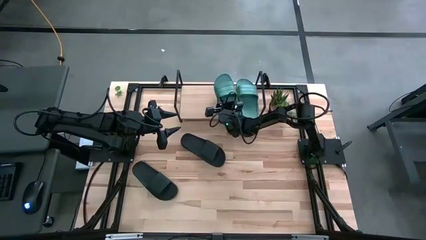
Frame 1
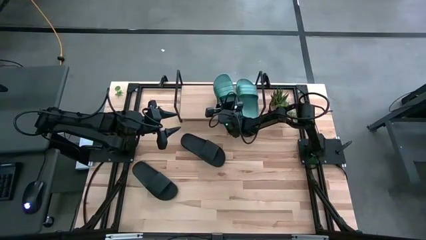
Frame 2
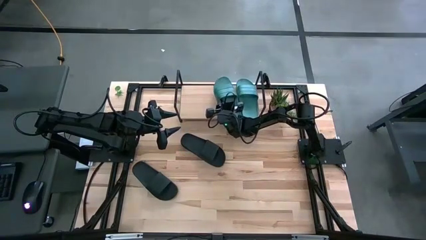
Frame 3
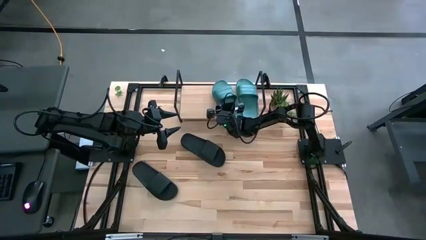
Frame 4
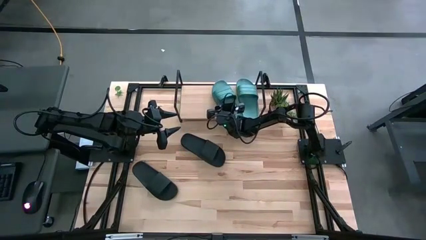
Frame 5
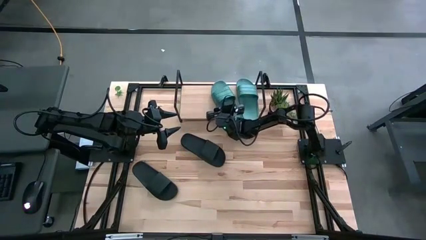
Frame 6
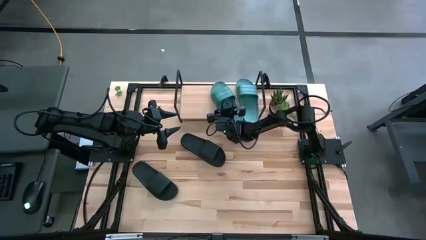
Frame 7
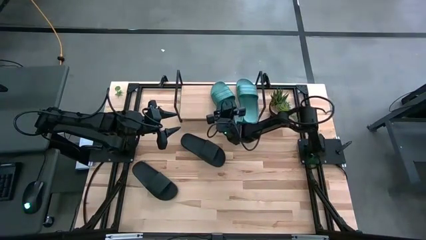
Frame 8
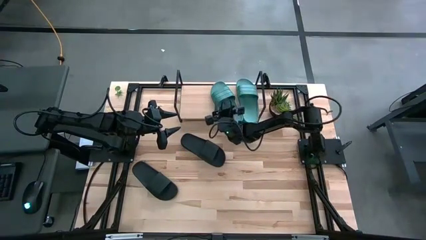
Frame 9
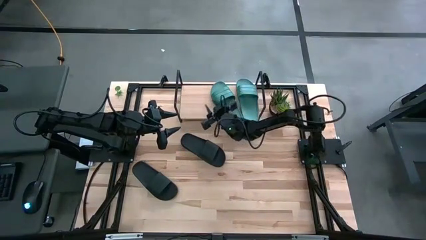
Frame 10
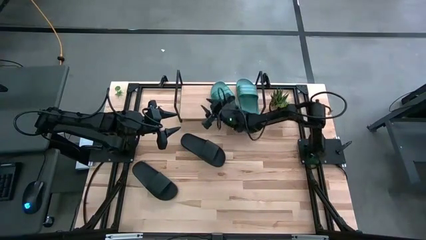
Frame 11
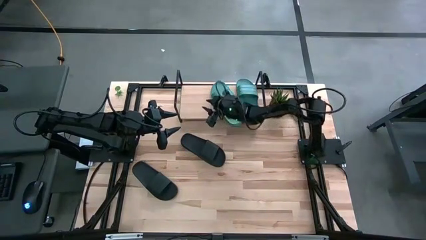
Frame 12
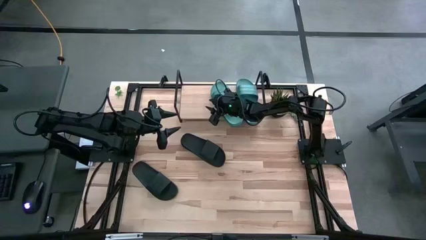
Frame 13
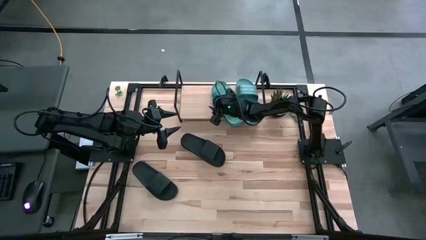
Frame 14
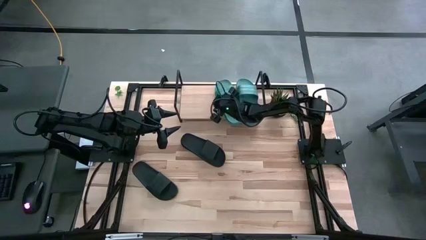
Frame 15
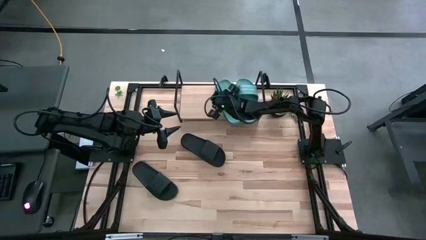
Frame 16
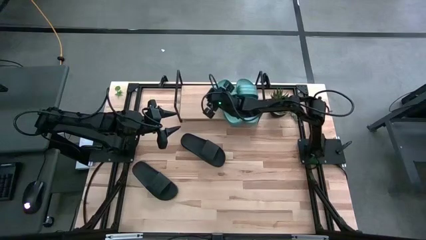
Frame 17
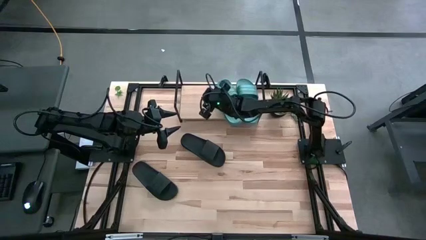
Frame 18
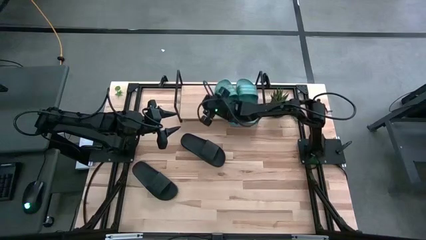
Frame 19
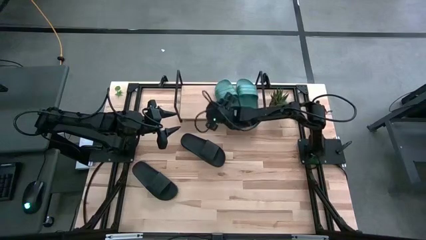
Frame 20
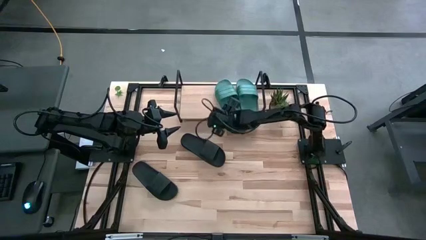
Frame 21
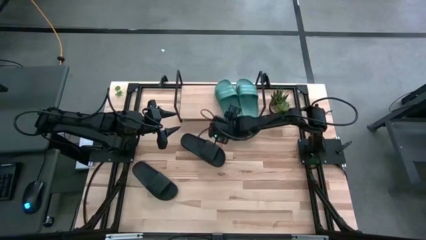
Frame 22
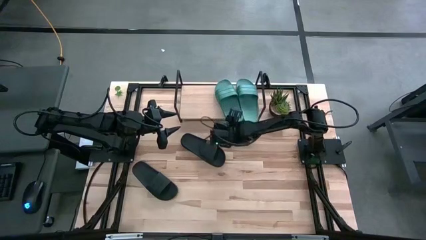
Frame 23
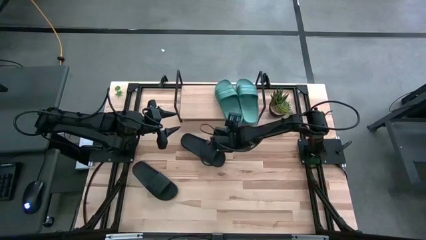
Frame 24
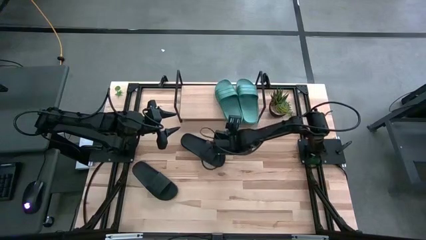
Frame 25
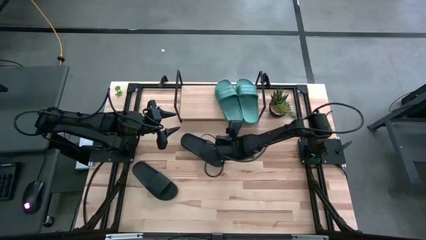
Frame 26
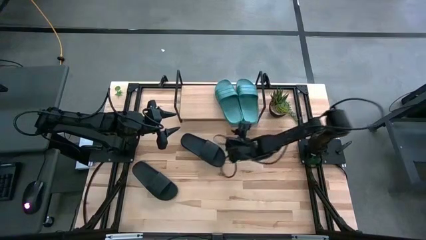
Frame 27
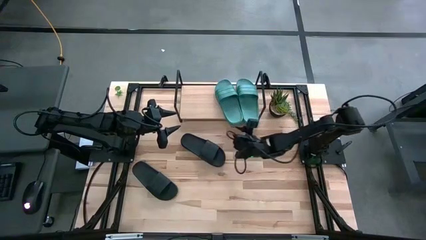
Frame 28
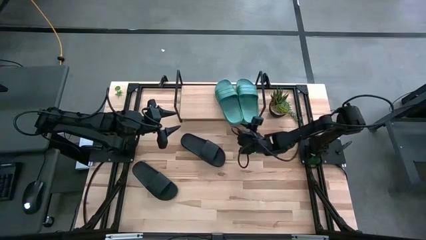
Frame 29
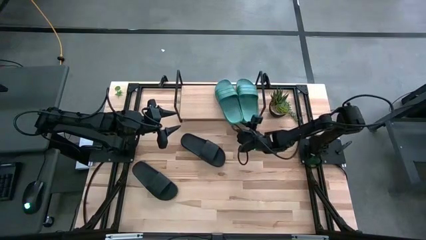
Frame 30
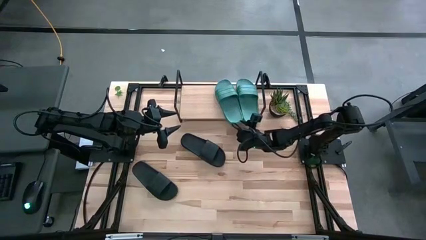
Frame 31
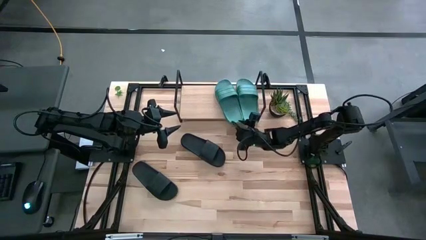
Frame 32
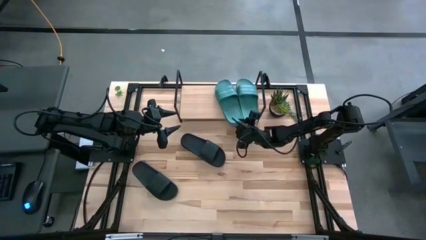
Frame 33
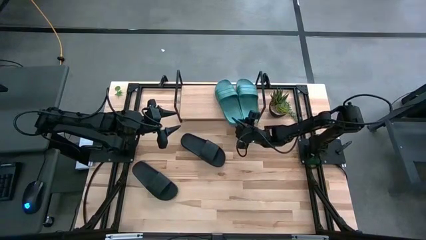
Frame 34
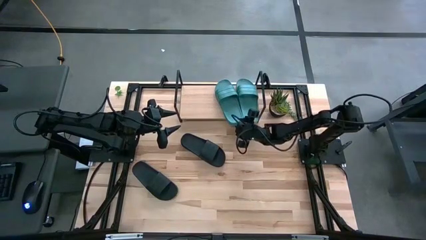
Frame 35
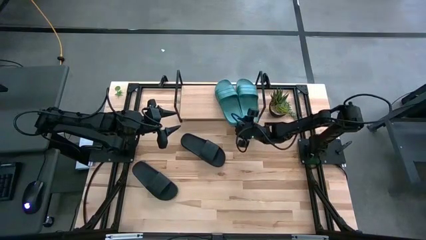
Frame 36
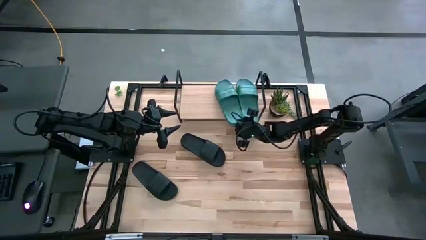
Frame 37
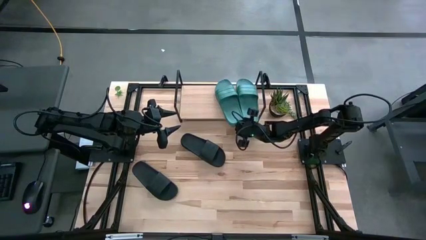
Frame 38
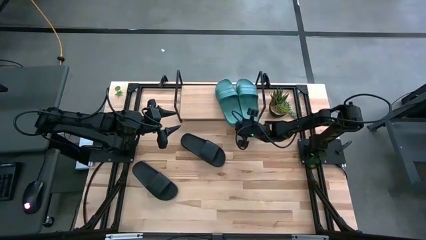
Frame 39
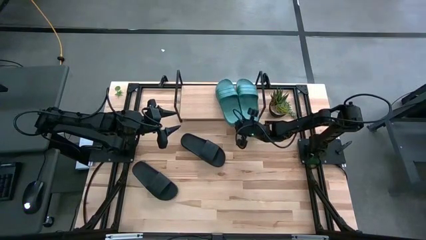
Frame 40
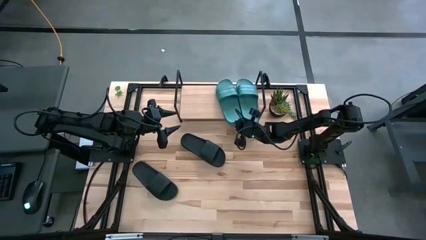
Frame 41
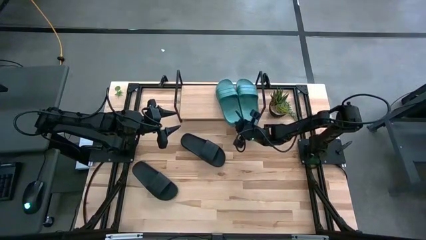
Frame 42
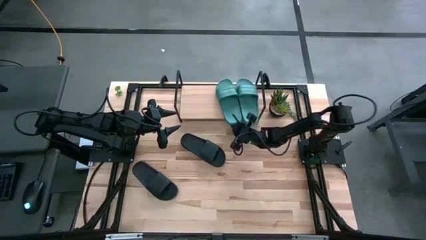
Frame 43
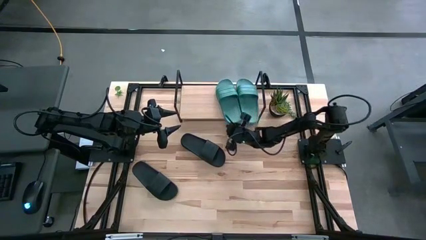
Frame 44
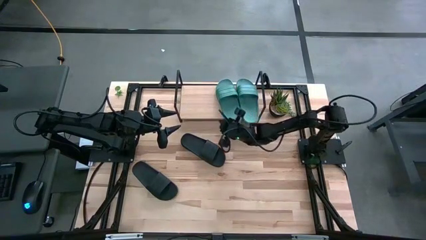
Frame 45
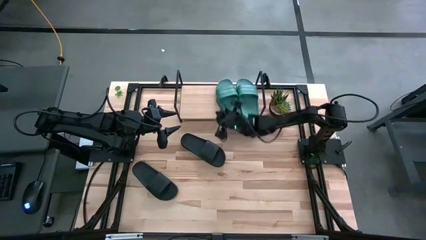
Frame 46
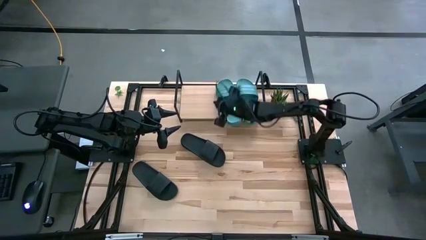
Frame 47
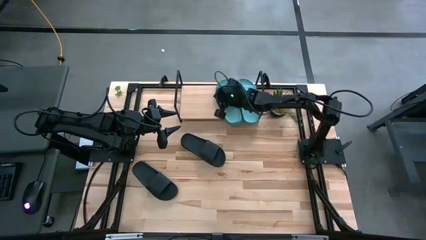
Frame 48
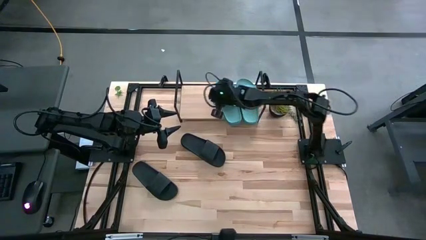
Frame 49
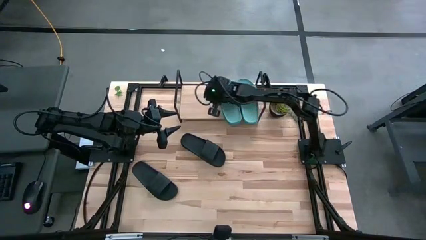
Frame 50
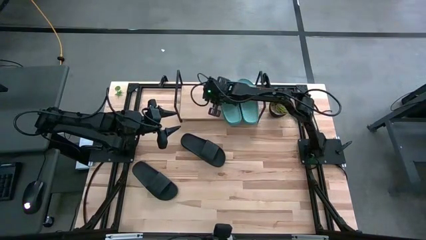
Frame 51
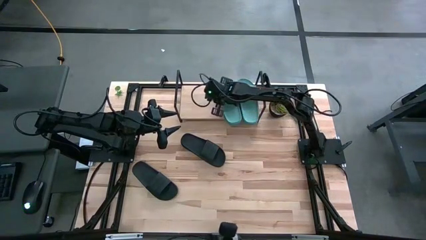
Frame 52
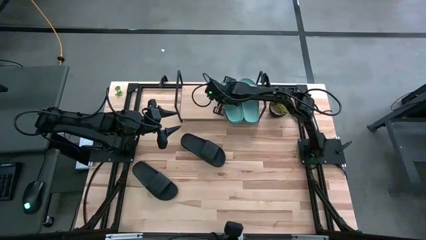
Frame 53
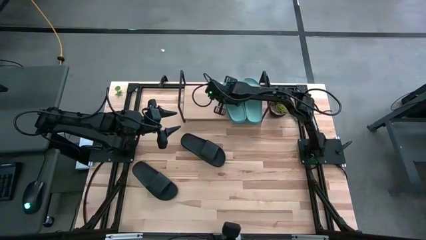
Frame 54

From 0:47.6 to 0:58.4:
Task: Pick and place slides into the shelf
Put the blue slipper on the shelf
